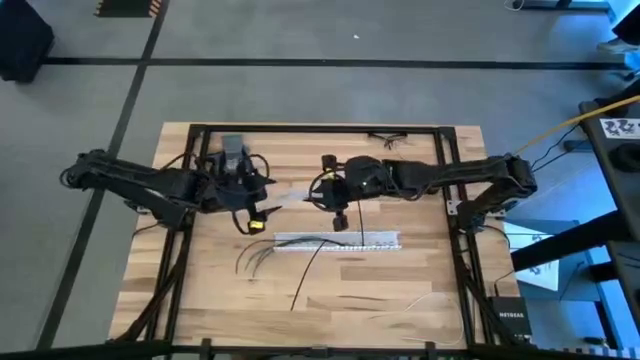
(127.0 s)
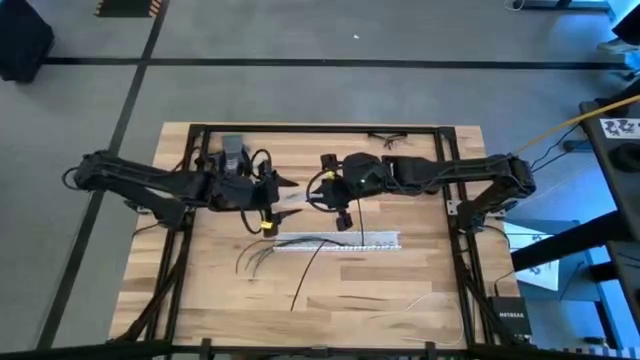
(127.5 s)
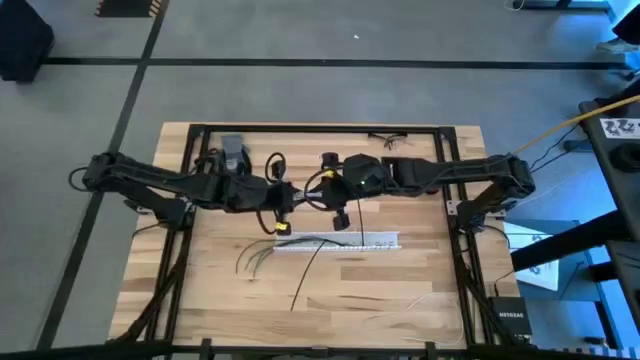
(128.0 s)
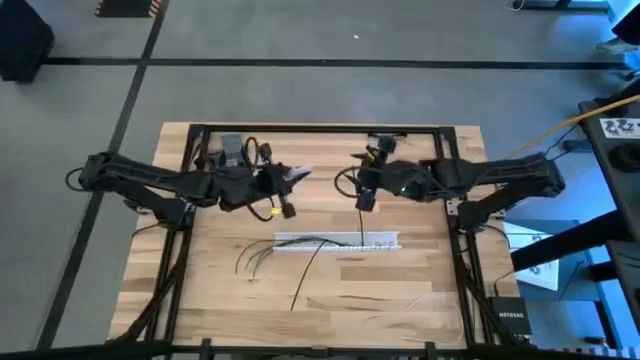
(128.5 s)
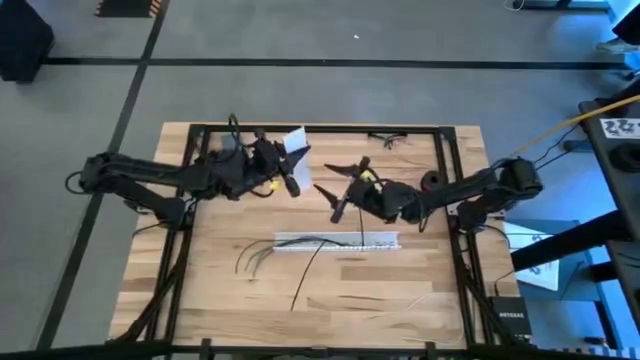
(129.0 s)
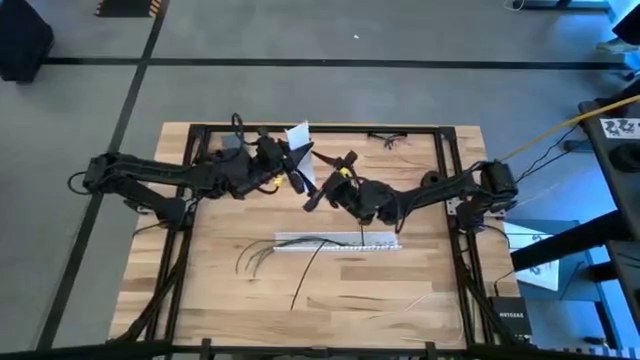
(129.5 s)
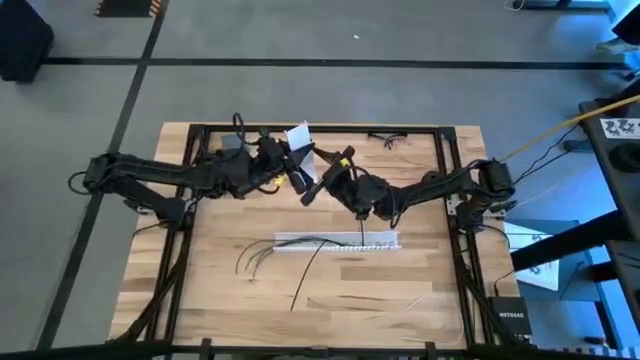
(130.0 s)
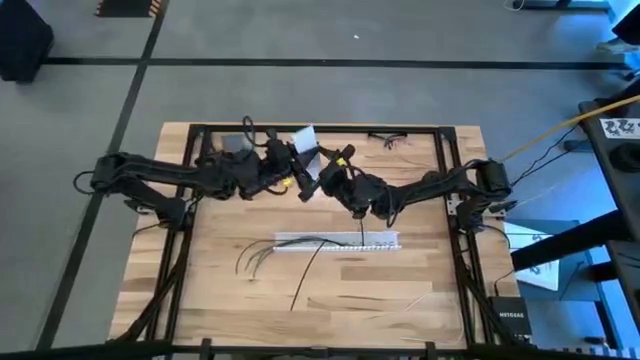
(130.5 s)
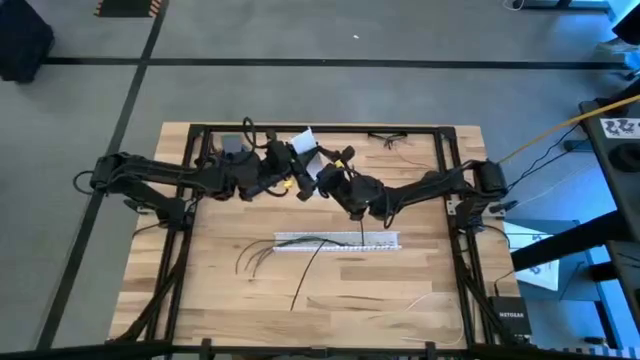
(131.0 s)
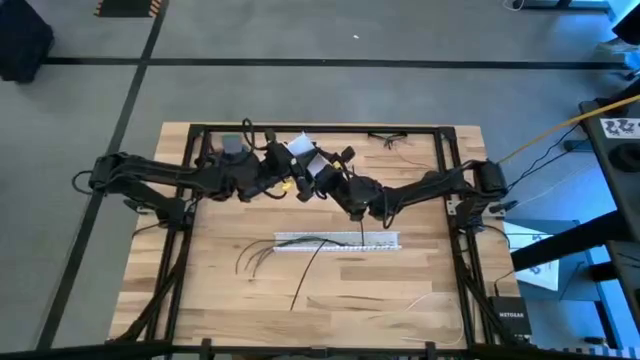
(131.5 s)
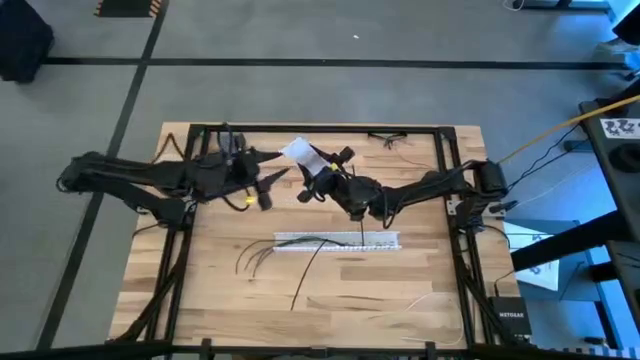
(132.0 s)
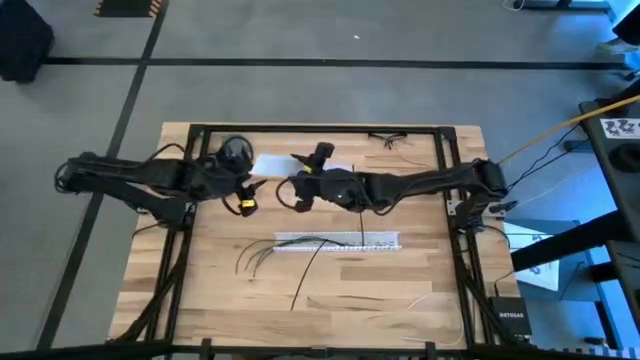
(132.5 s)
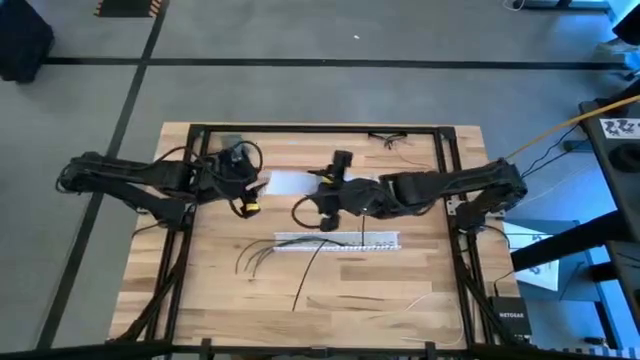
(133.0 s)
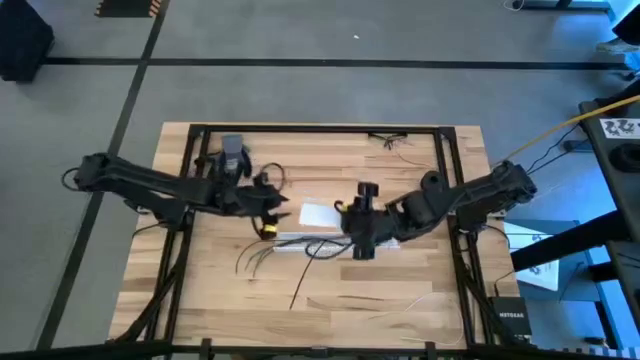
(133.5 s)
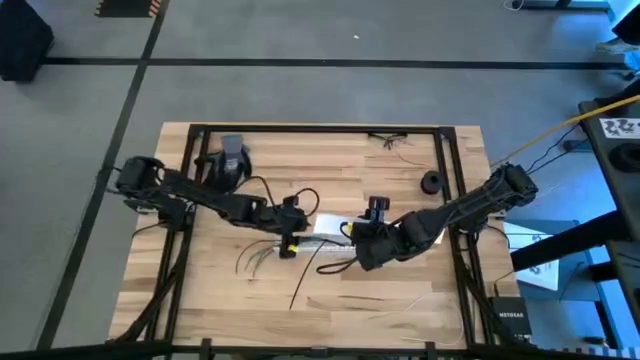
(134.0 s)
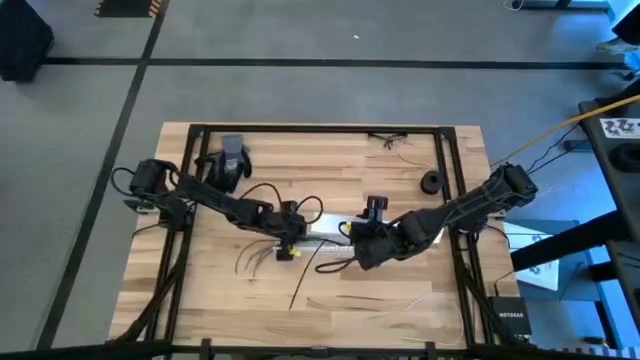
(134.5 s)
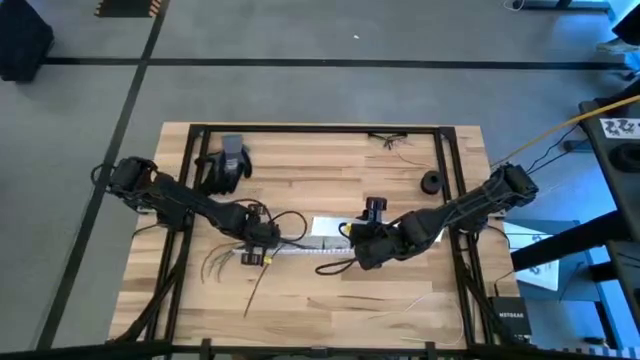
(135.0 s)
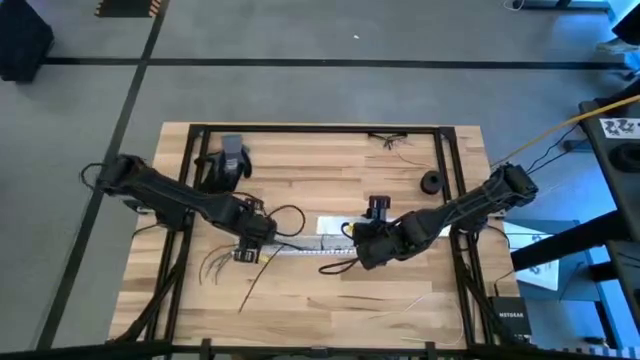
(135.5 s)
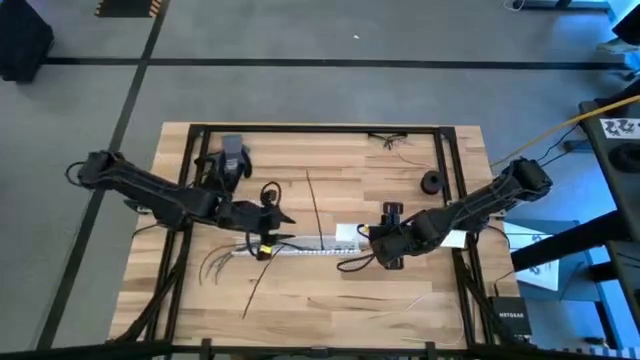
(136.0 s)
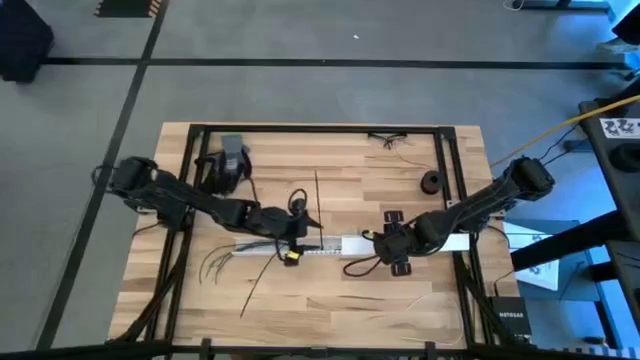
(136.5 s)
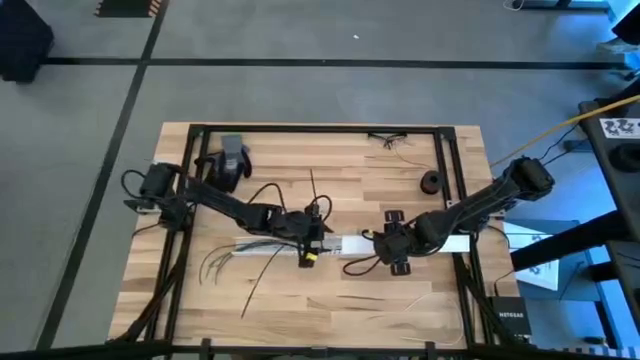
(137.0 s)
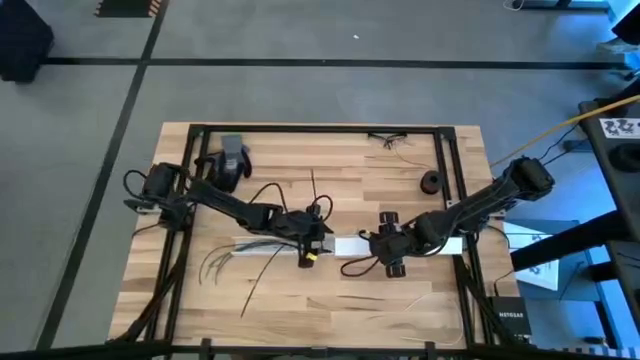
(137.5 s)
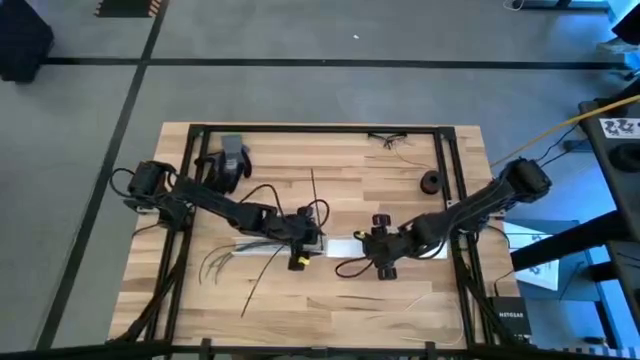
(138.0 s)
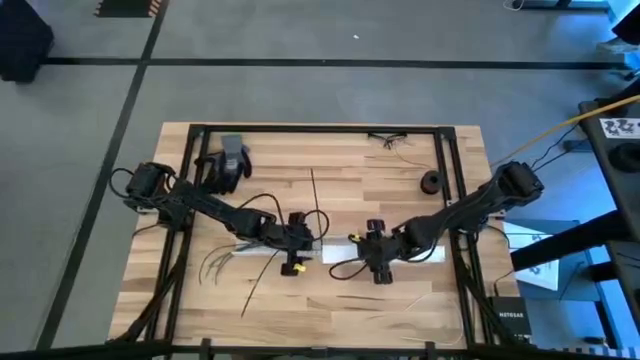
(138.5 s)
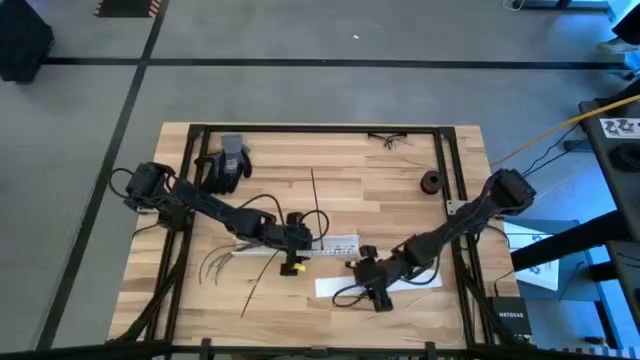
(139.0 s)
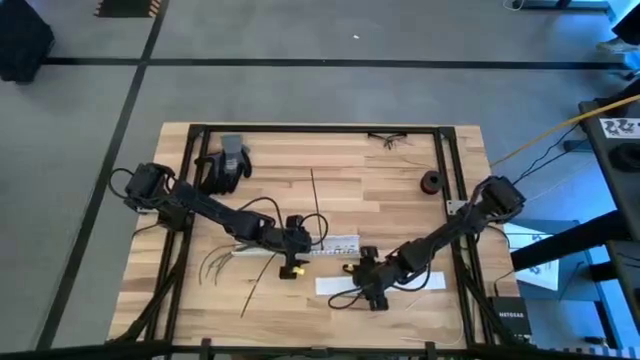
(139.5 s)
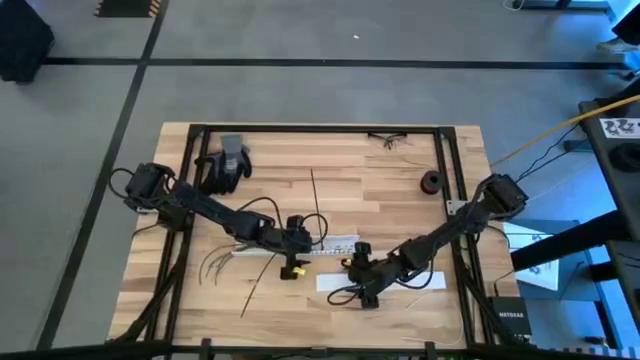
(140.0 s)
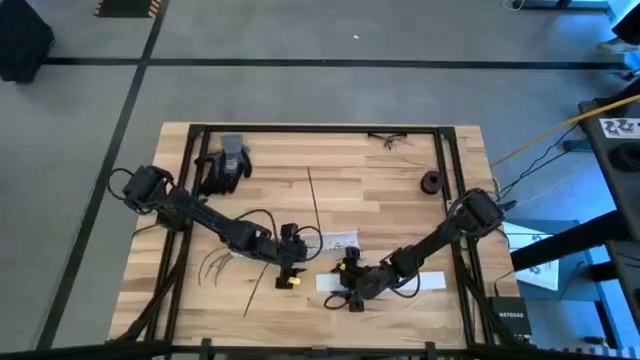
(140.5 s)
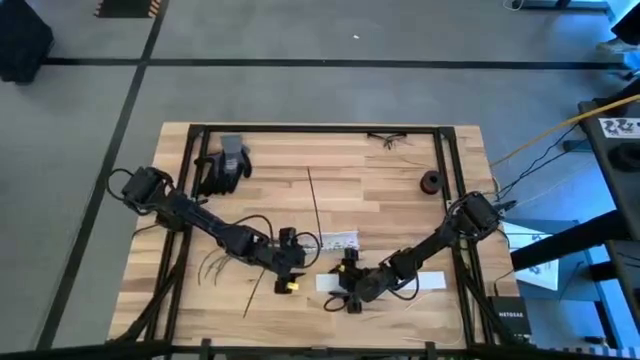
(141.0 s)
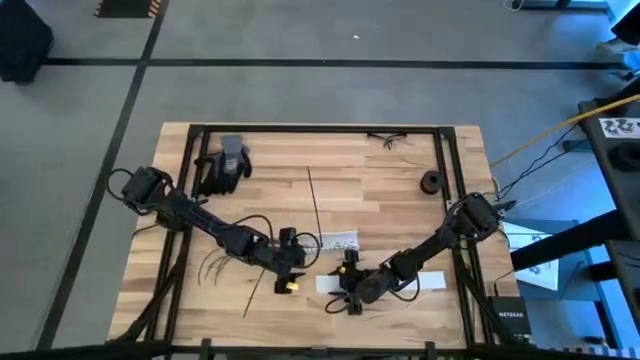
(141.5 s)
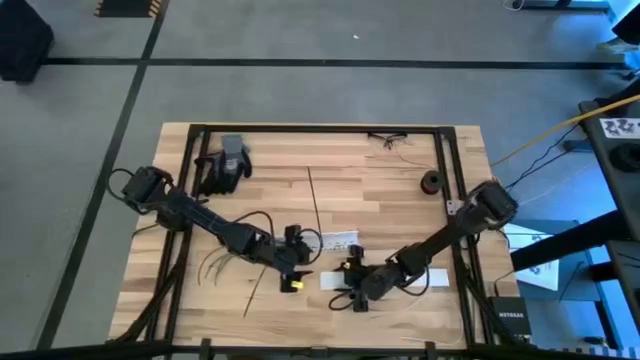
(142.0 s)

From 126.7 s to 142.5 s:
Task: Ziptie cables
Close the cable duct

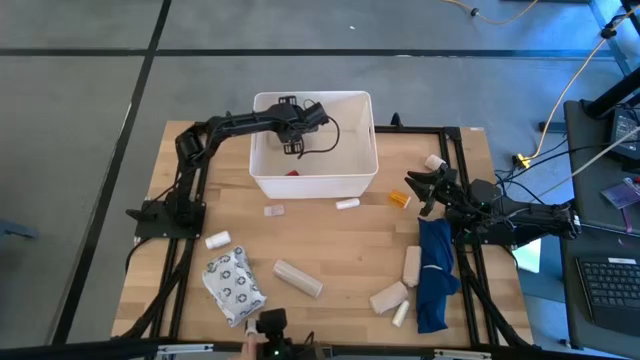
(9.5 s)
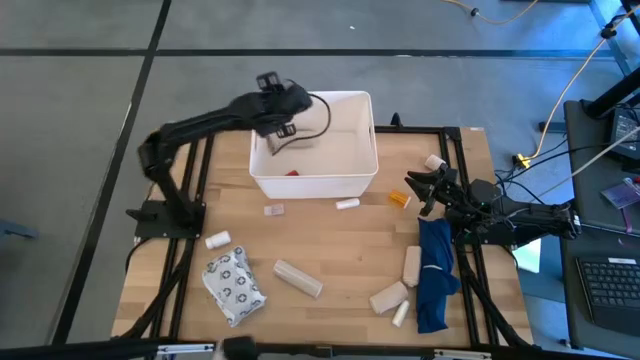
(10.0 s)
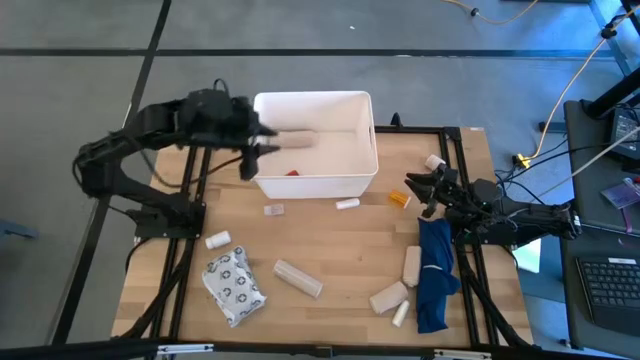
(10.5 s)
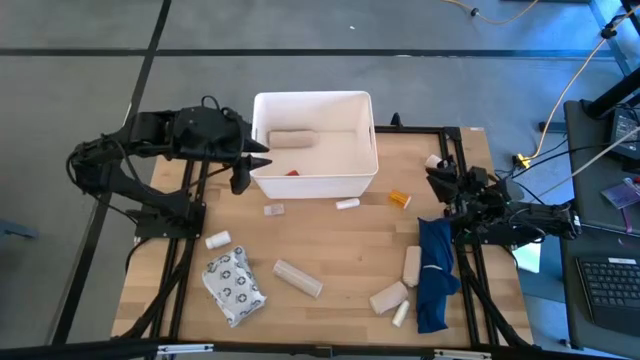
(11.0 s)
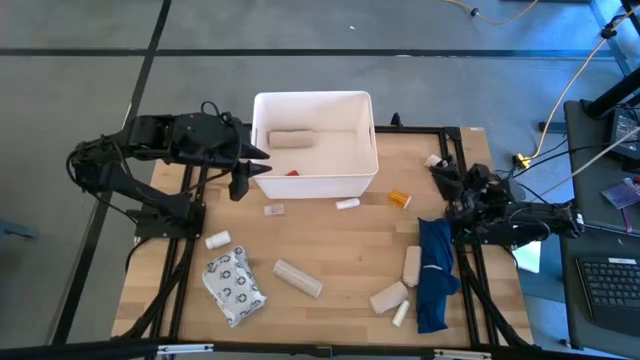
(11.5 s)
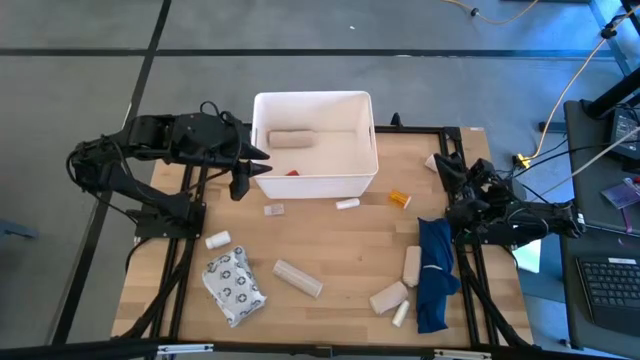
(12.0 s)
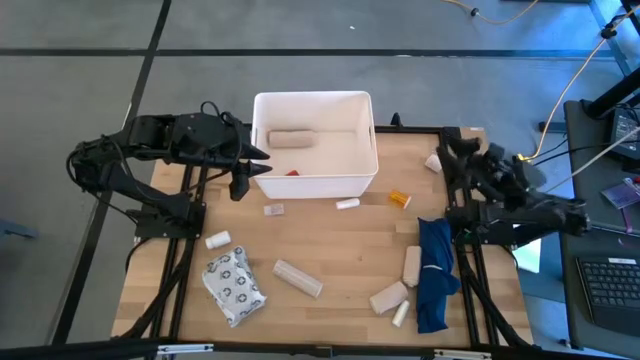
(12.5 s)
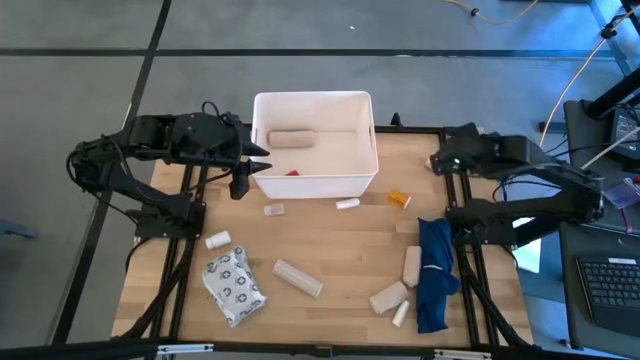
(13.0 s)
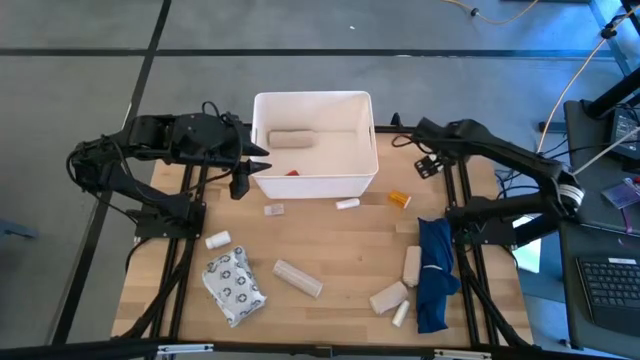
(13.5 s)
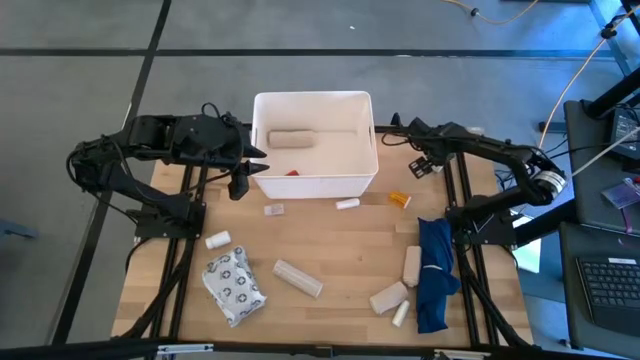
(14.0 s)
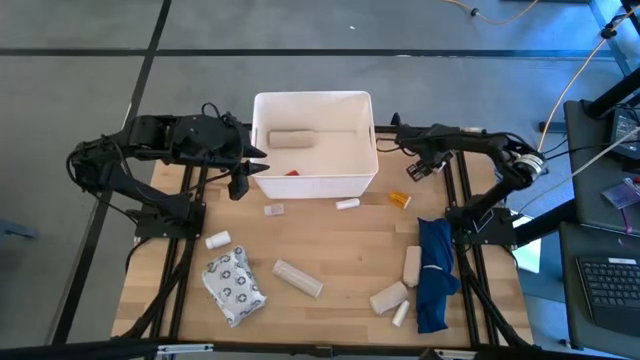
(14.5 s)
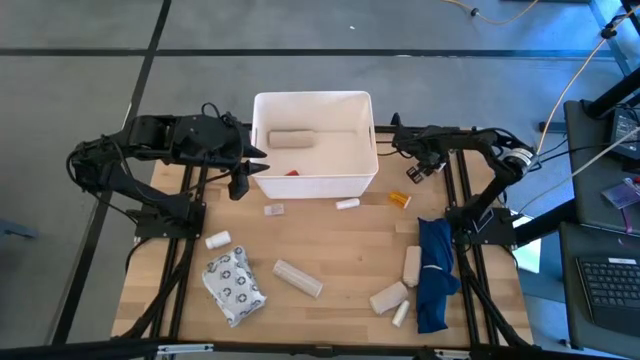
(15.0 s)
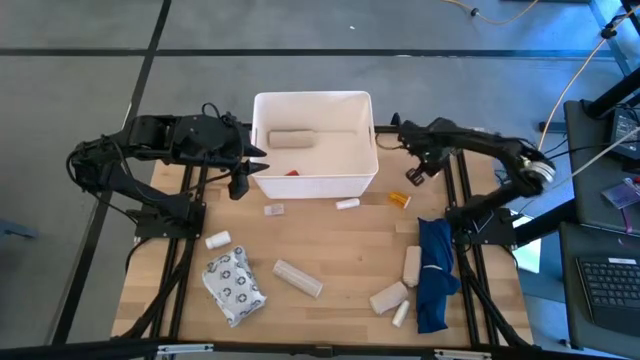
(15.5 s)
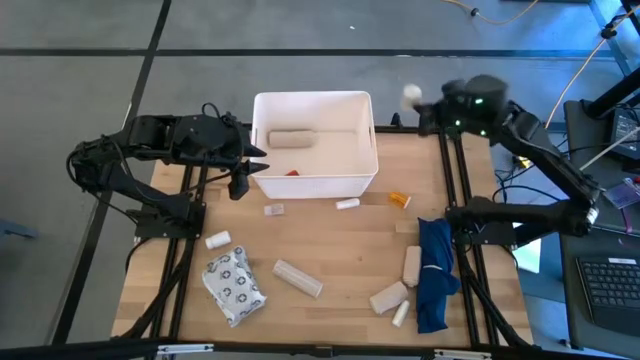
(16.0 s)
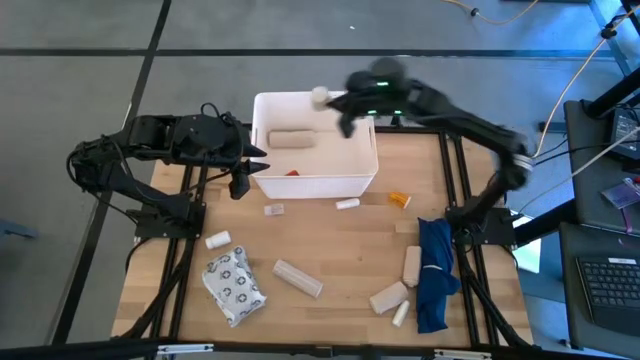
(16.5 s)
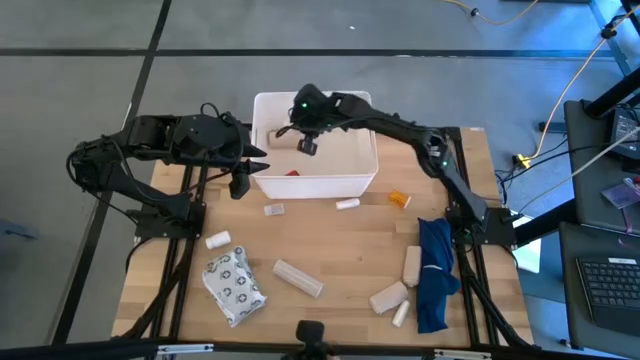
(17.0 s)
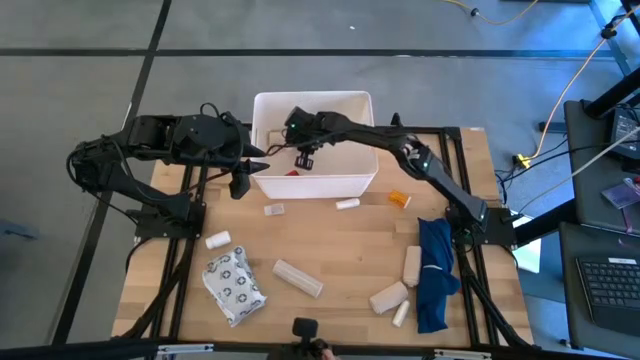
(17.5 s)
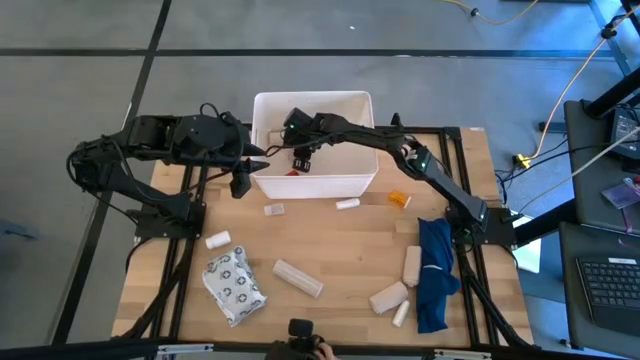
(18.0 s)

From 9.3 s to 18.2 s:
Task: Pick & place medical supplies in basket/bin
Put the white bandage into the white bin
